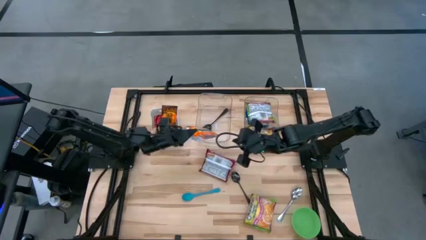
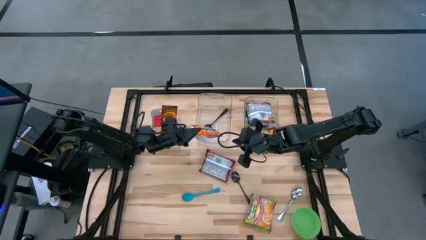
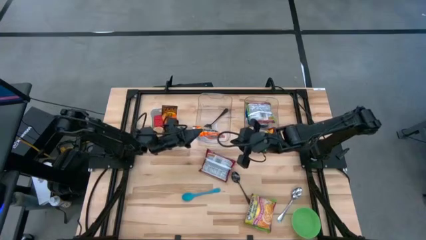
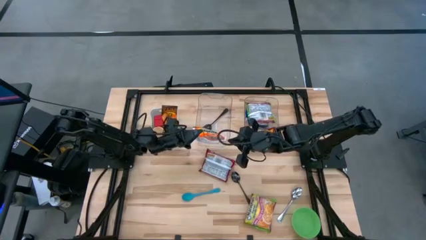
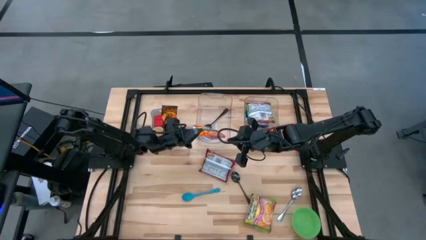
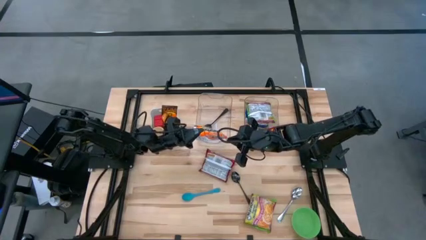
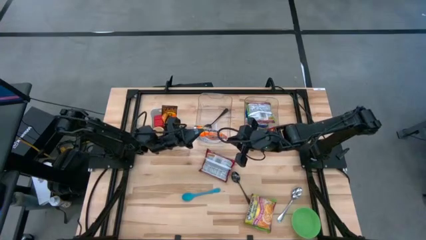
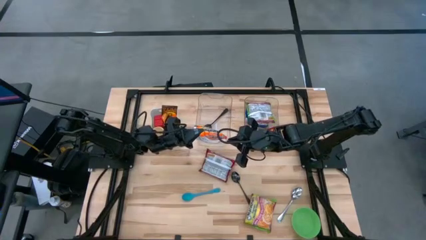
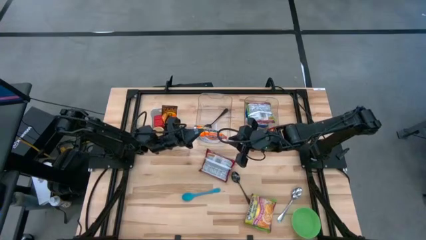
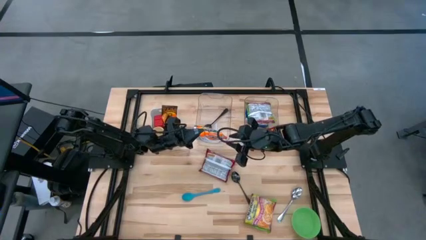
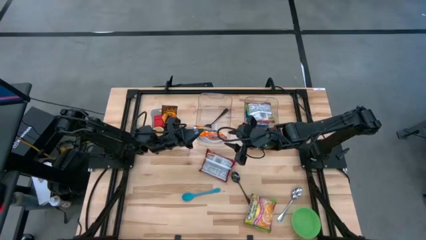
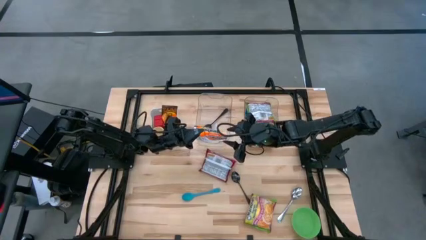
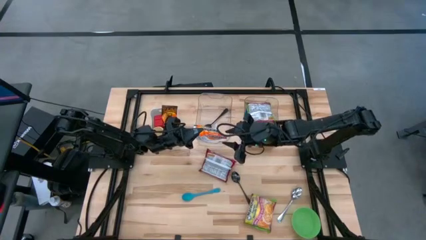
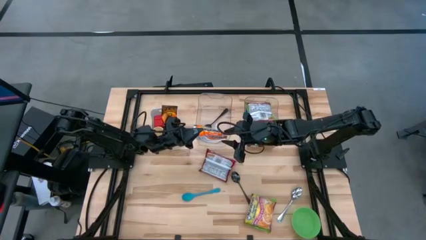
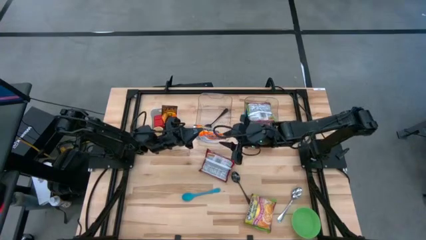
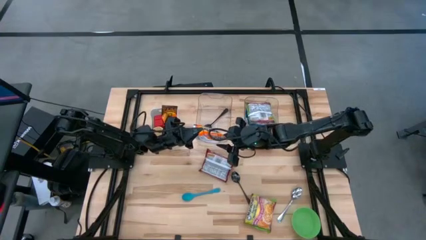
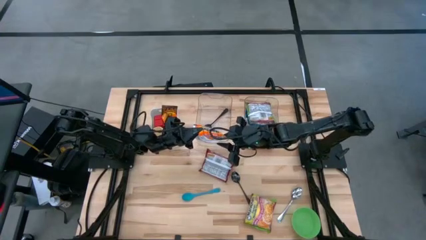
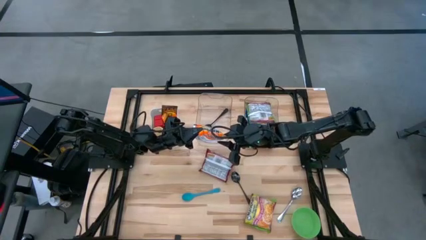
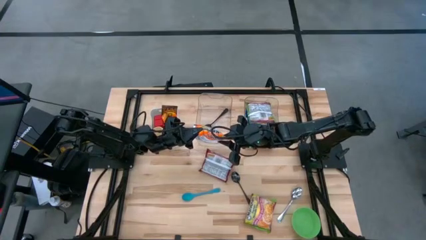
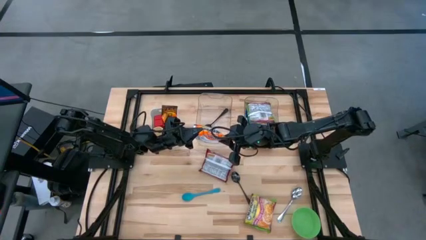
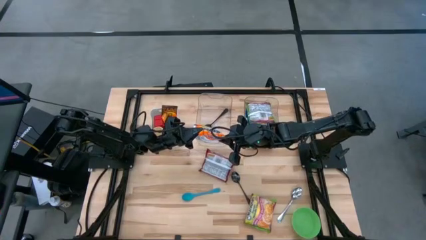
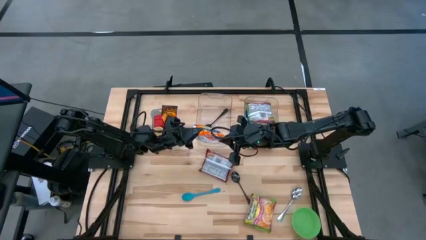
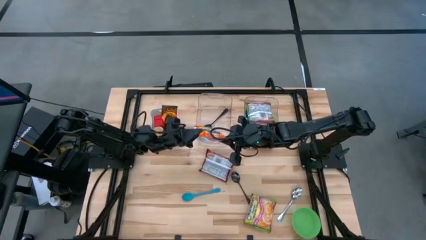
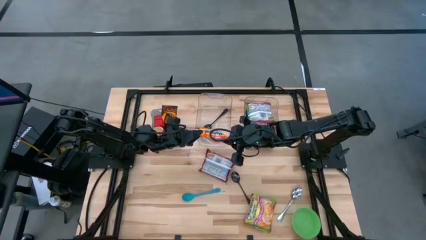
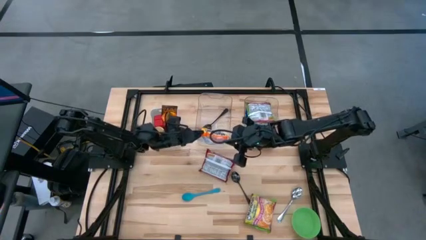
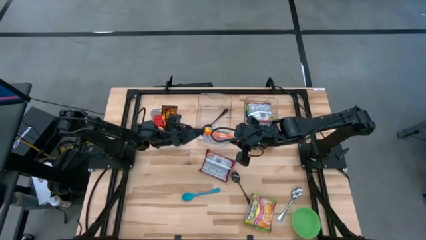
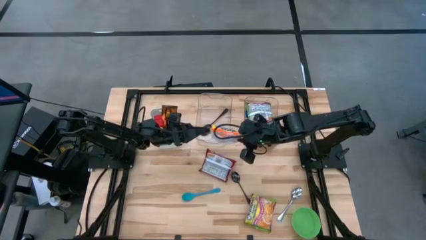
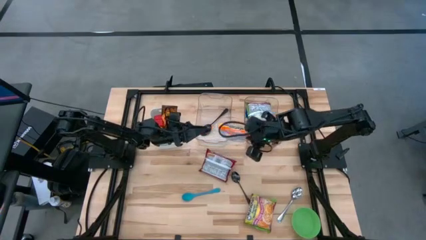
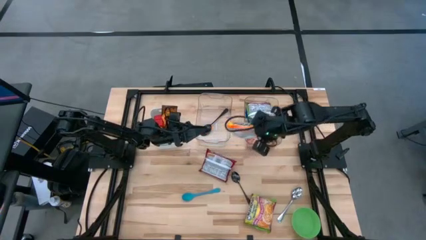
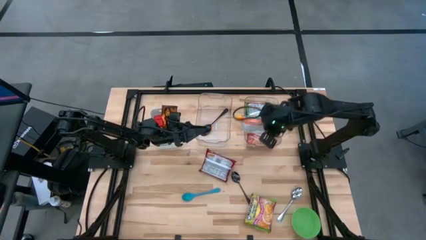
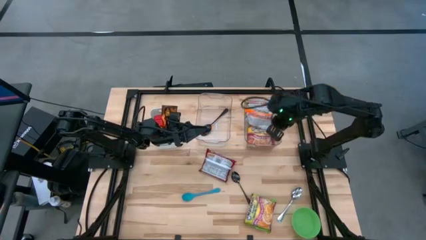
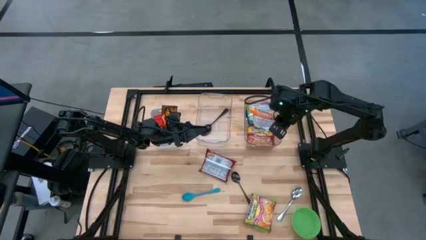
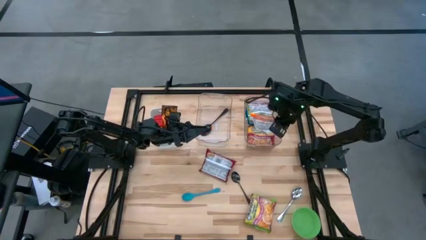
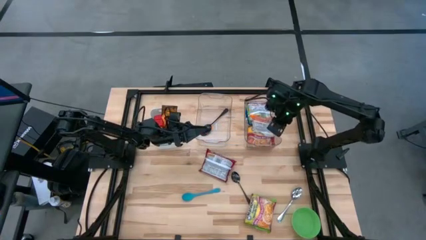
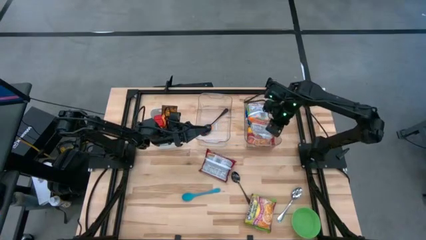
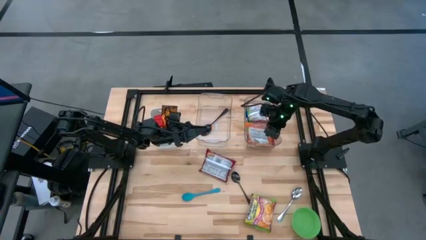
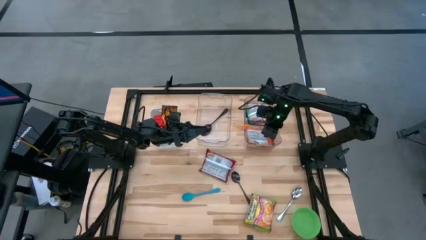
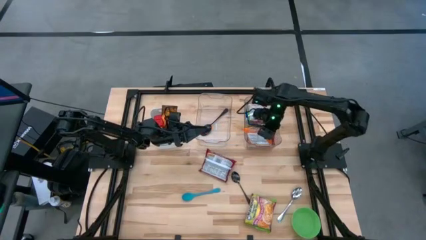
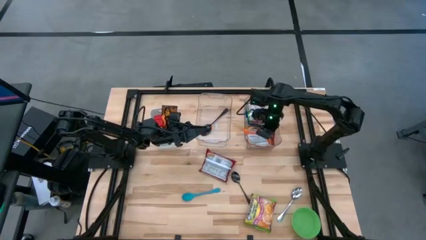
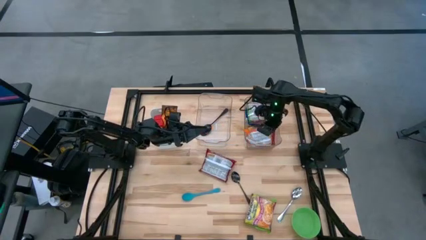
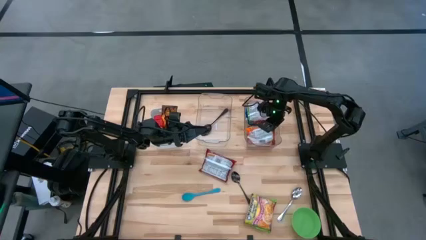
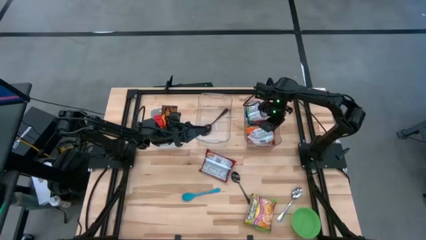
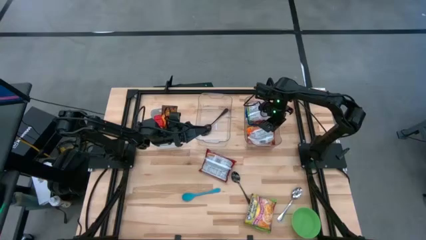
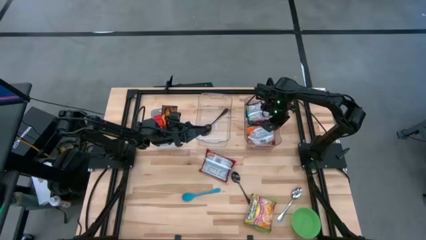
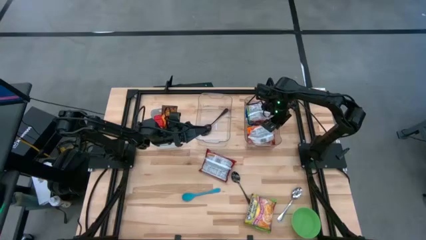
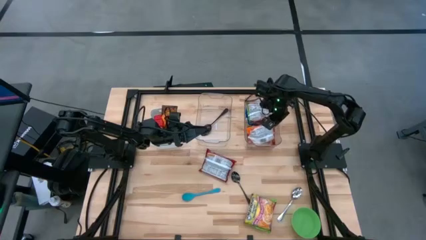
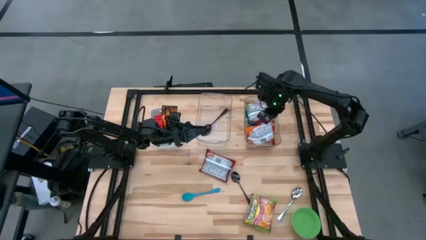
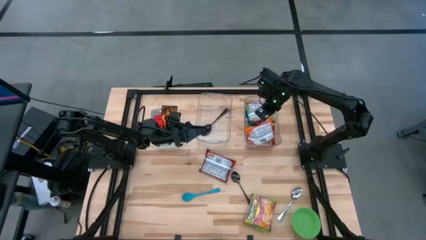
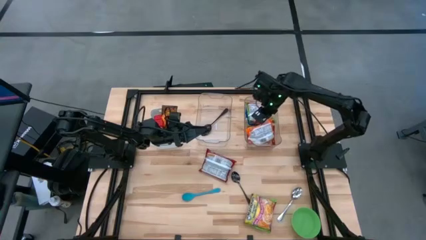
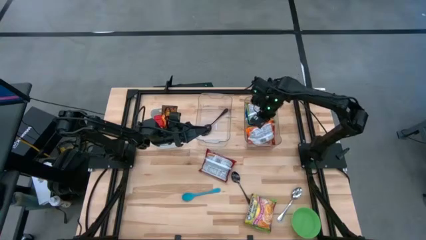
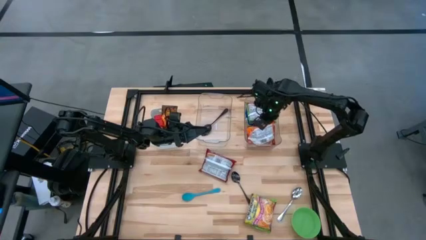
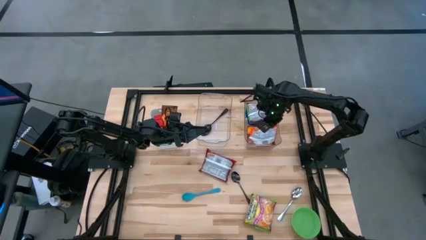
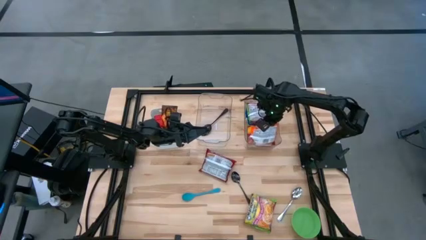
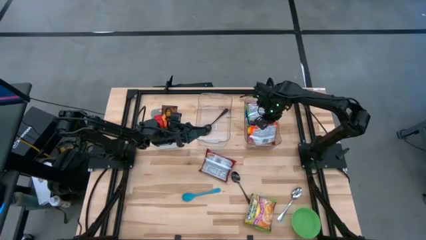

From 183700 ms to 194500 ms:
Task: Pick & Place Food Item
Put the orange noodle pack into the right transparent bin
